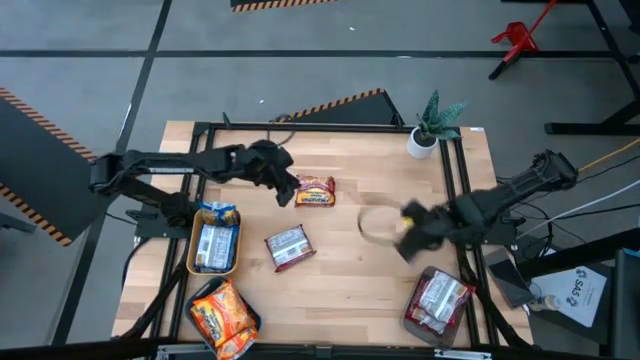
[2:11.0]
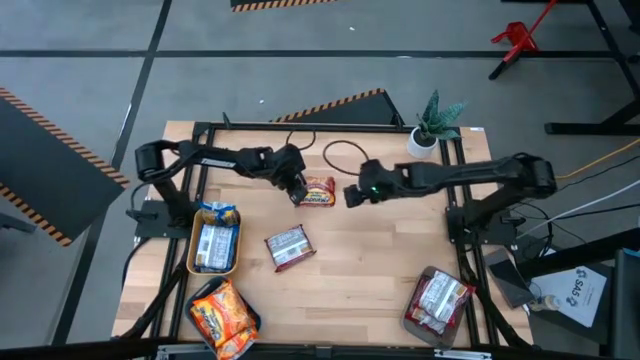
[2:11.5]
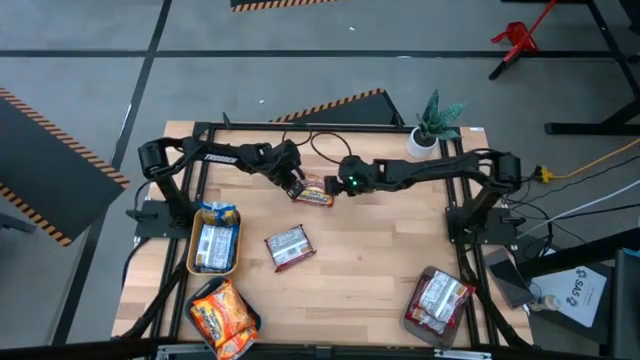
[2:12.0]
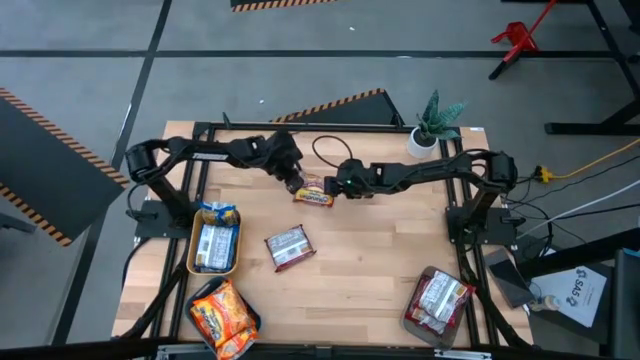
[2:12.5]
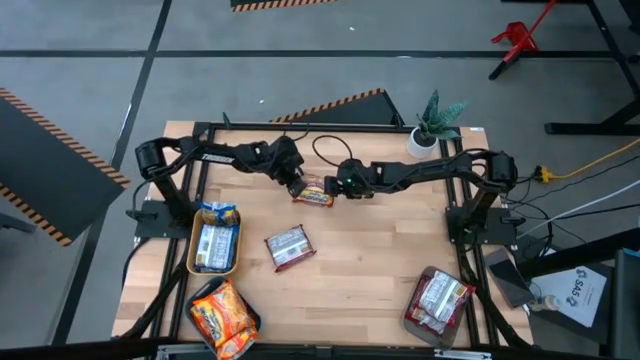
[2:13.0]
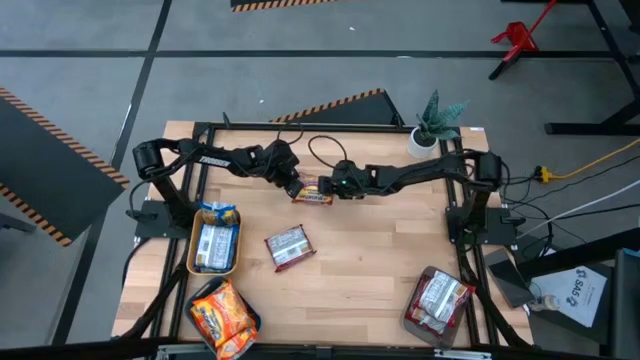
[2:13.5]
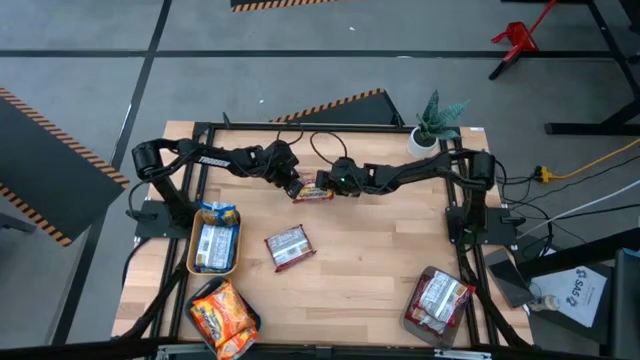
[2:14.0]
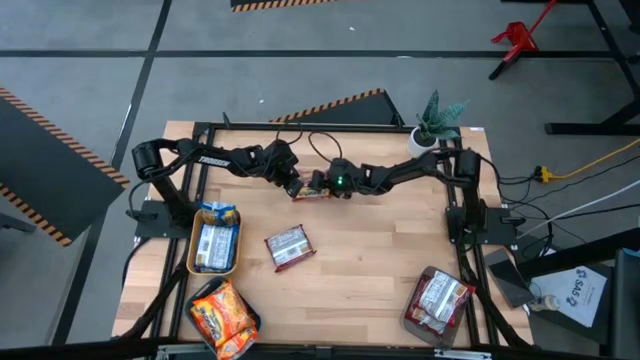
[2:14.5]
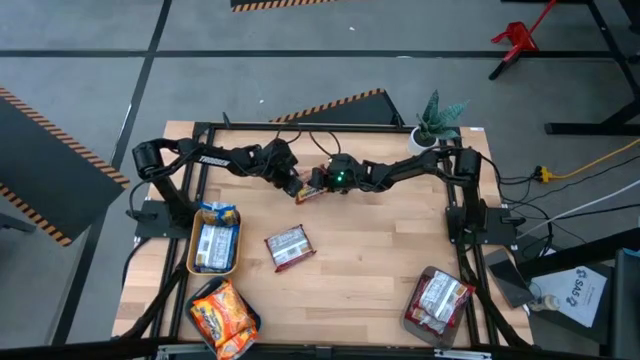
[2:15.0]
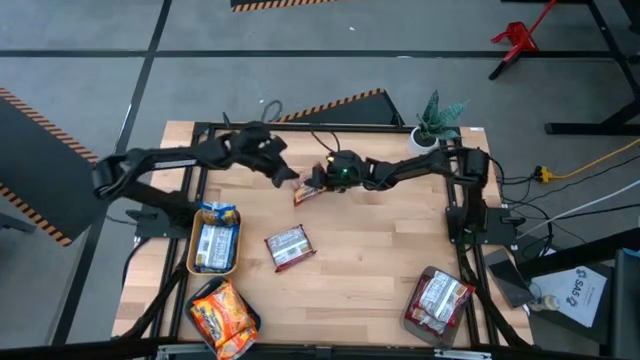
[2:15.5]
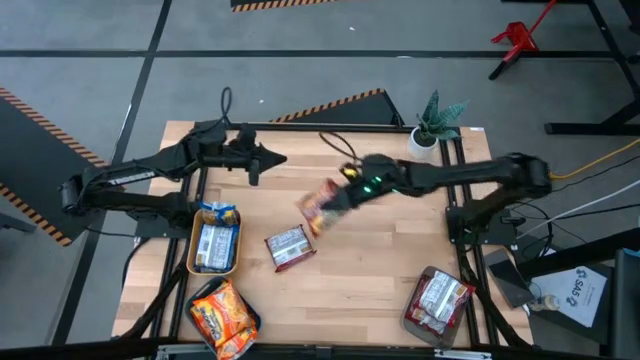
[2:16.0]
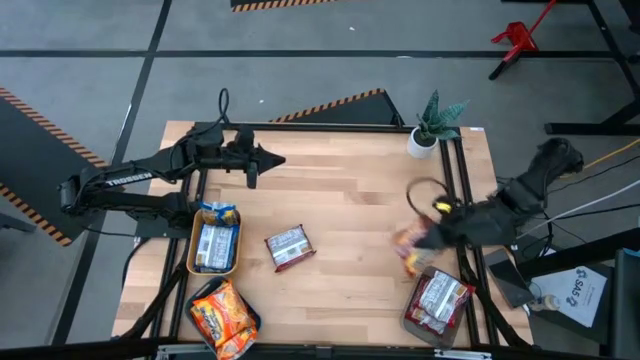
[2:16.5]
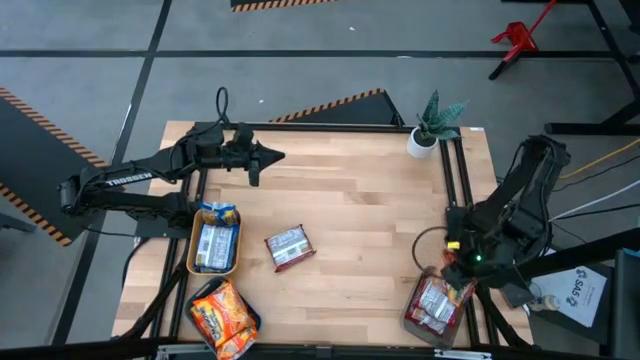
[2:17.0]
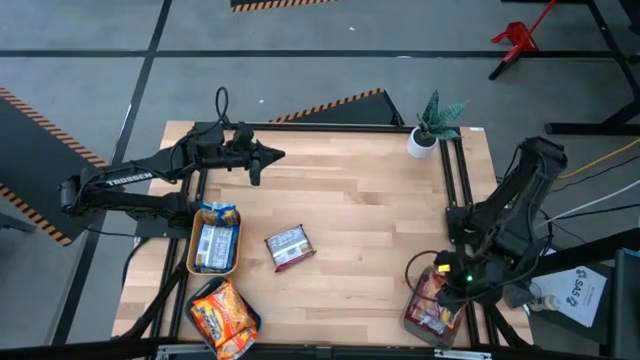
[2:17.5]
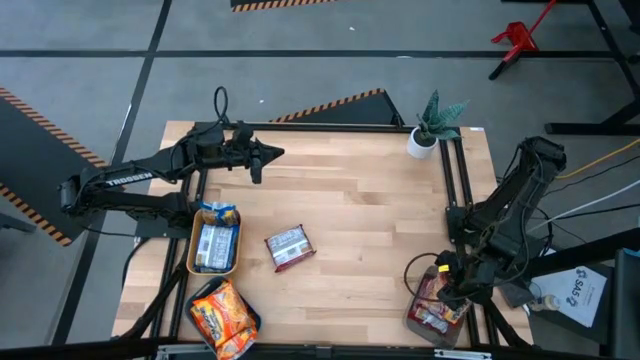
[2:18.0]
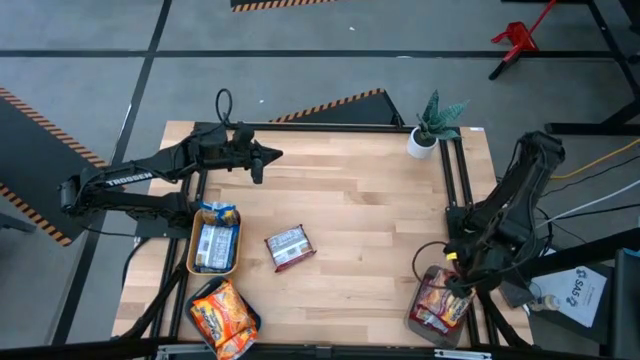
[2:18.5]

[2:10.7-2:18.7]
Task: Sort Maruchan noodles
Put the red noodle pack into the black bin

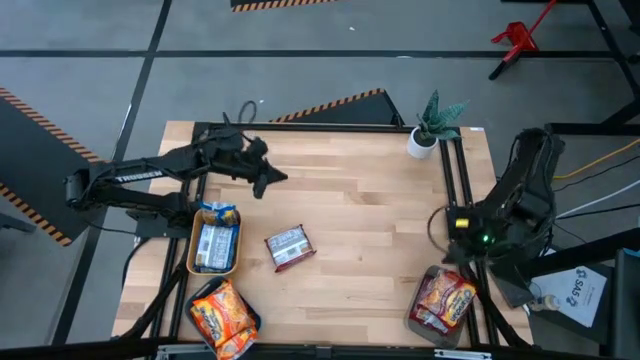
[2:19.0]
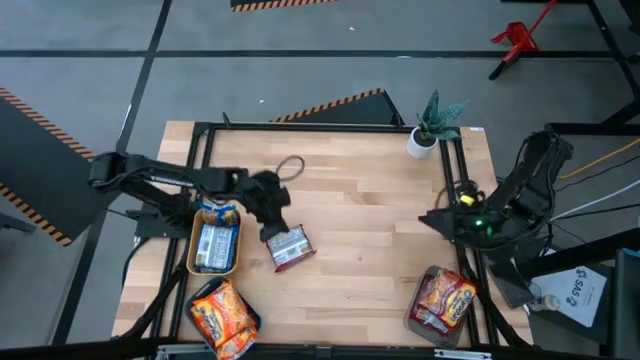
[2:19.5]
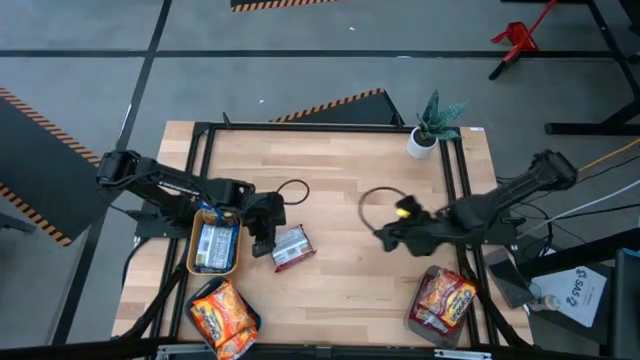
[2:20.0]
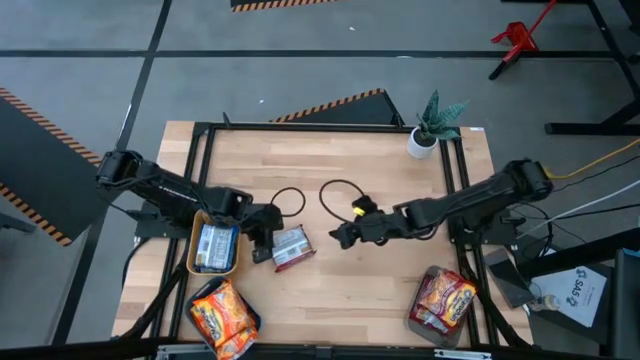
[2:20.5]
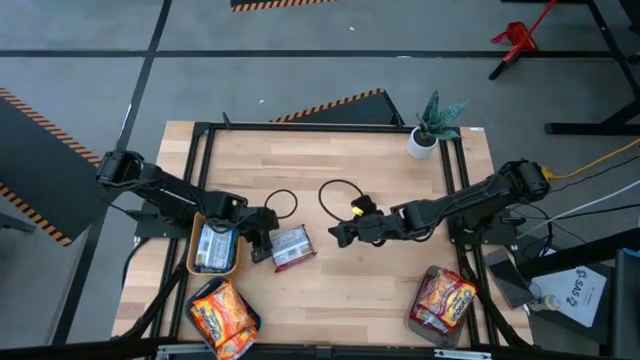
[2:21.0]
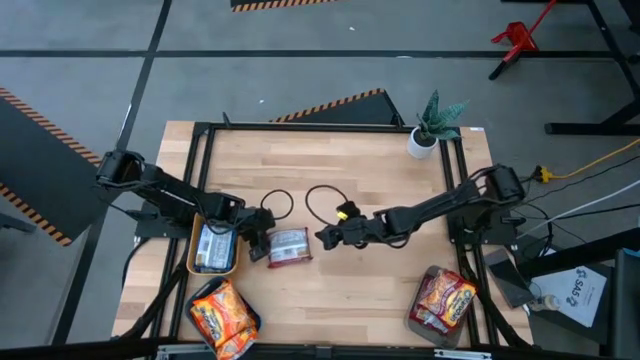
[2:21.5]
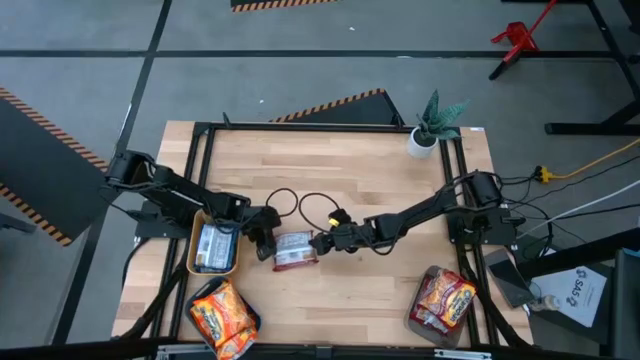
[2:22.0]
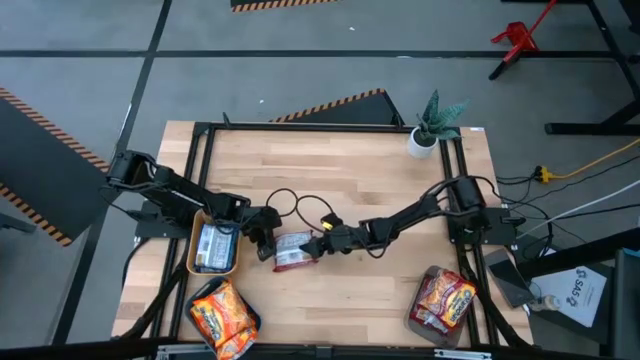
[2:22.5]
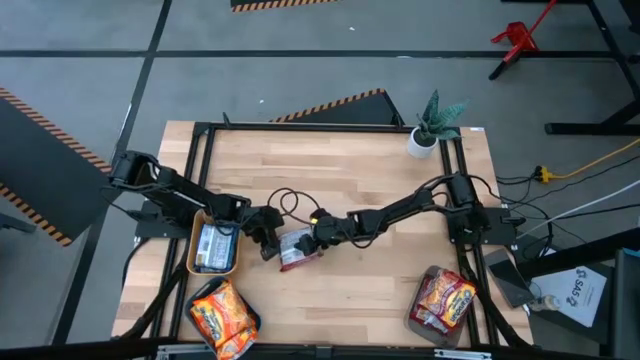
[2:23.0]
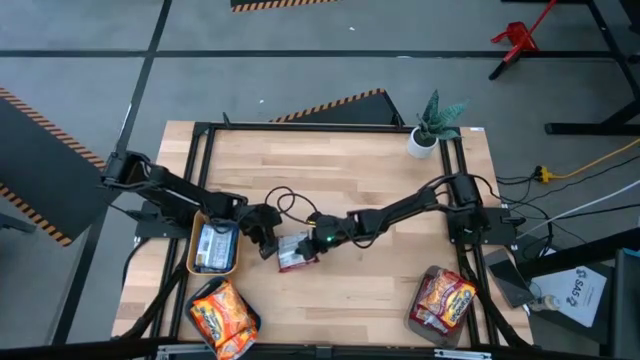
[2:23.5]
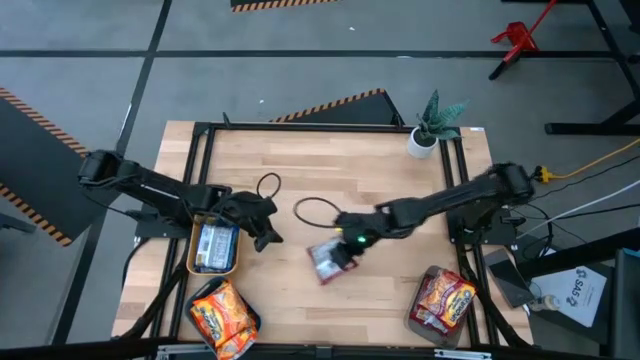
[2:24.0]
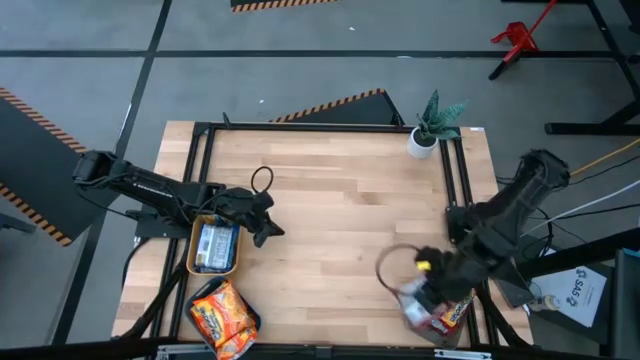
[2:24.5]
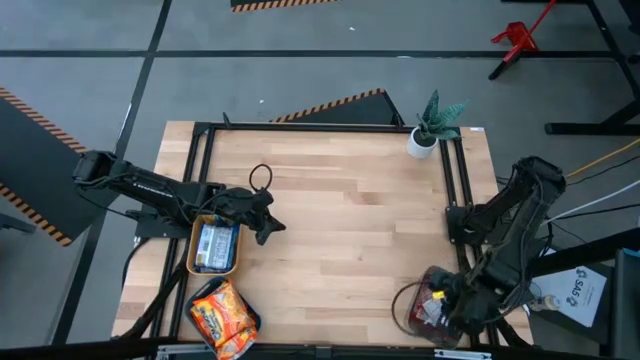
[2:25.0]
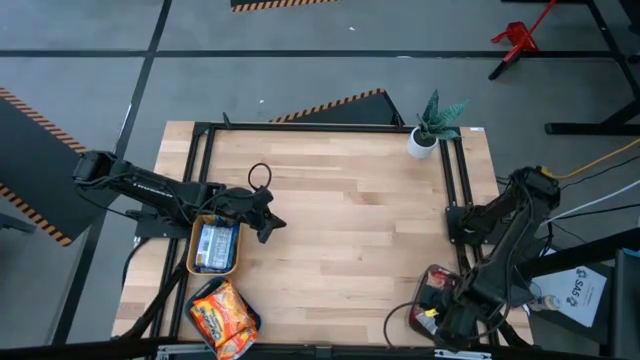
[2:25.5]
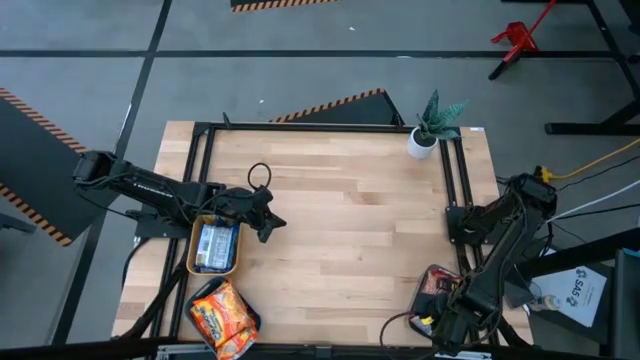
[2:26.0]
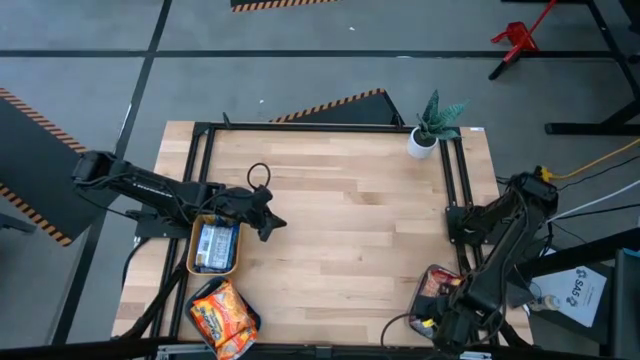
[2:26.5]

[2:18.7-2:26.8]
Put the red noodle pack into the black bin

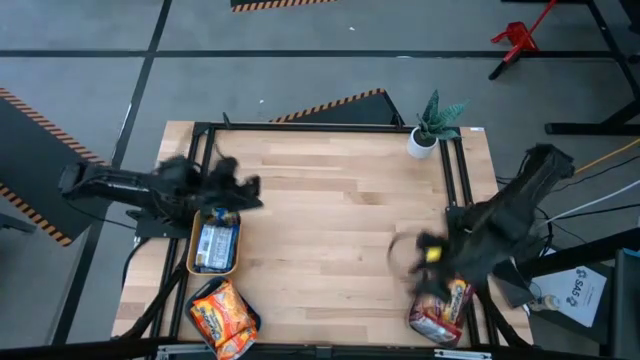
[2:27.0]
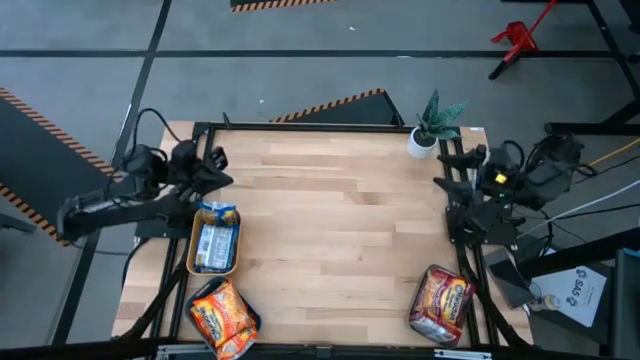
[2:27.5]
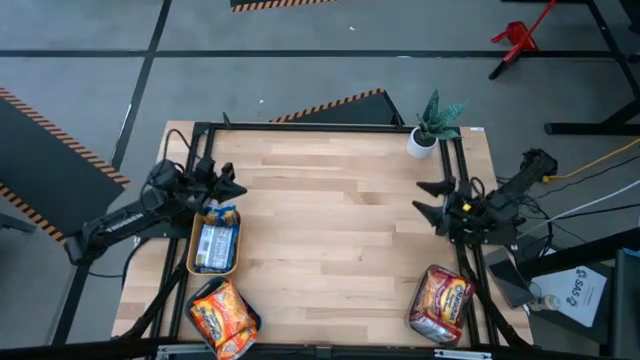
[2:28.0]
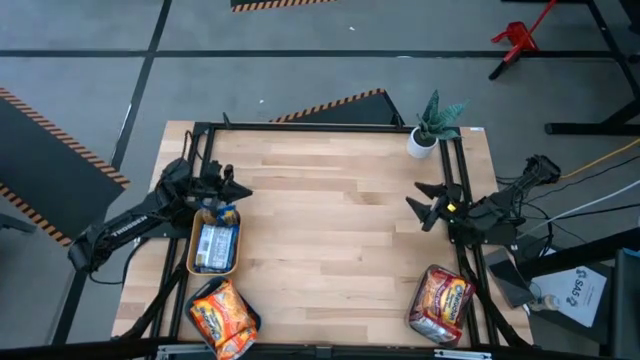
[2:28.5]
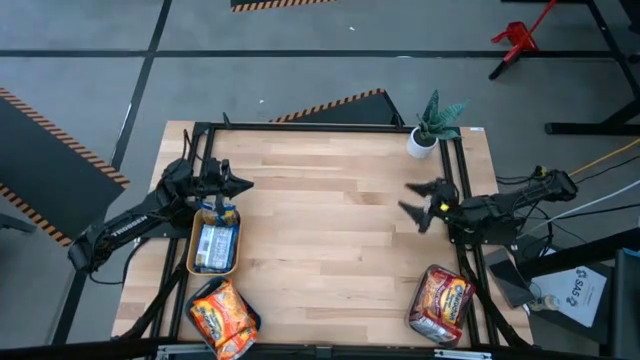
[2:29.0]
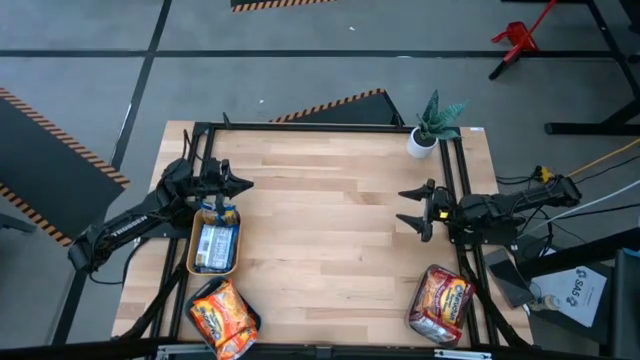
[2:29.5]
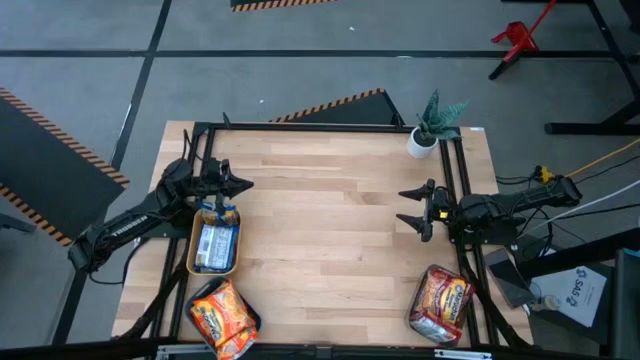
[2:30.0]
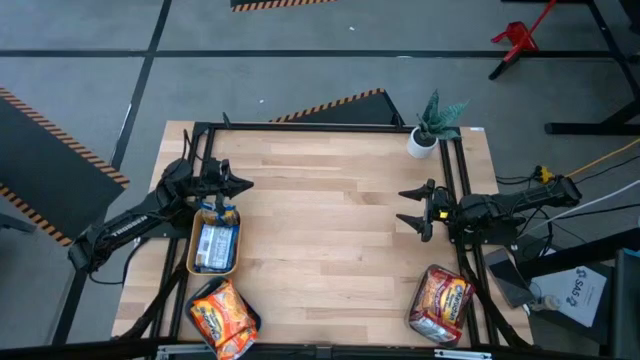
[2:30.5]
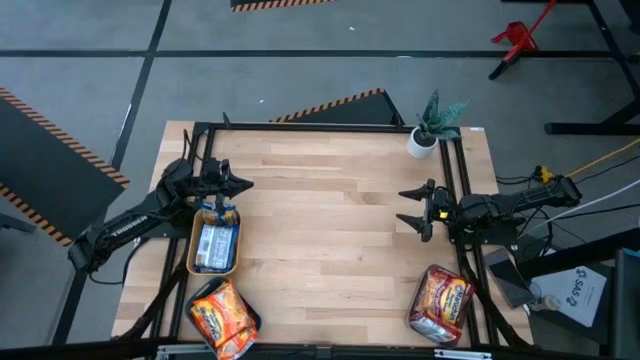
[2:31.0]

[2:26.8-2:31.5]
Return to Home Position

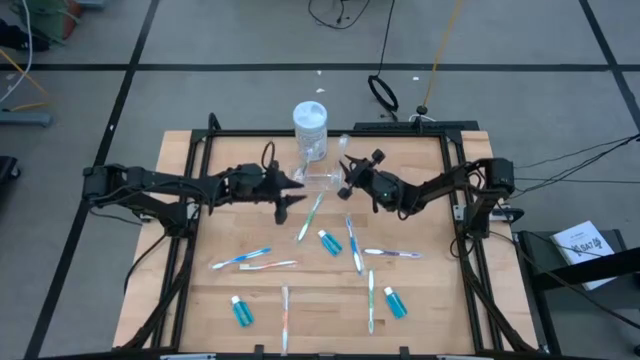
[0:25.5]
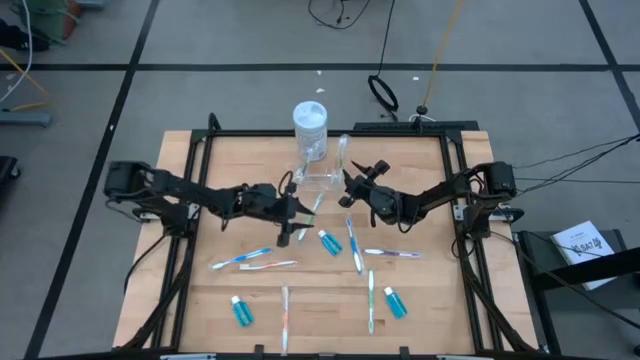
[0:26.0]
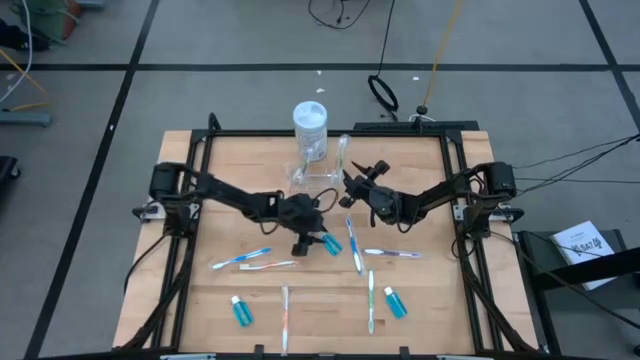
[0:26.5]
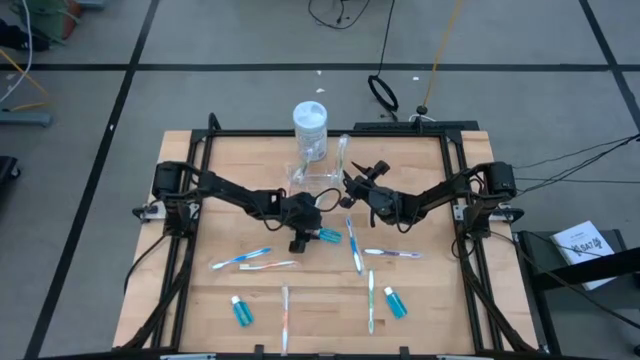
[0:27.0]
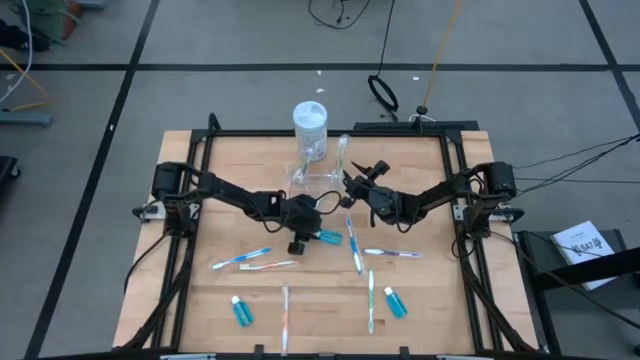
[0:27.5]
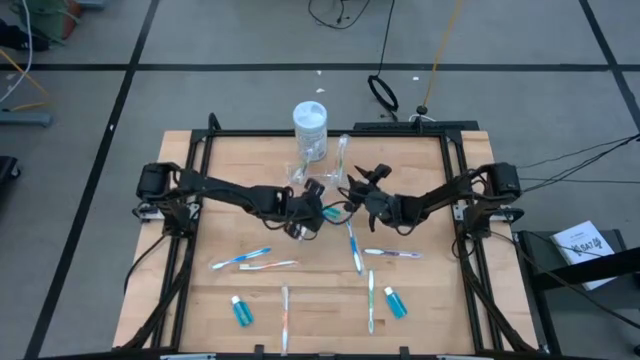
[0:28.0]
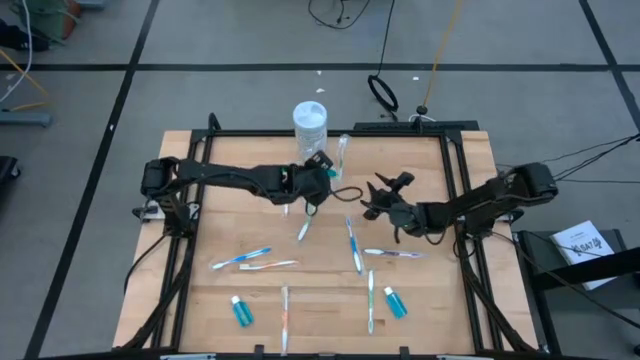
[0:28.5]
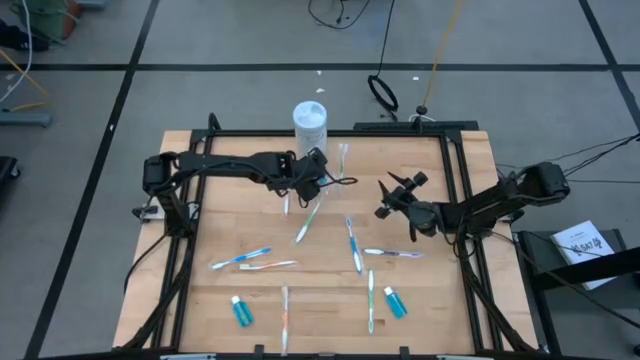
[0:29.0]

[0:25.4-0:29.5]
Task: Pick & Place toothbrushing station
Put the blue mouthwash bottle into the transparent organizer
